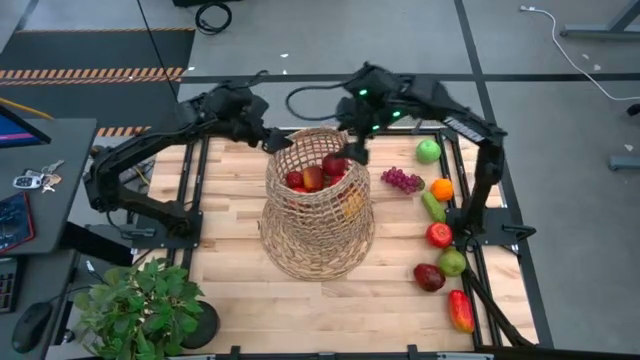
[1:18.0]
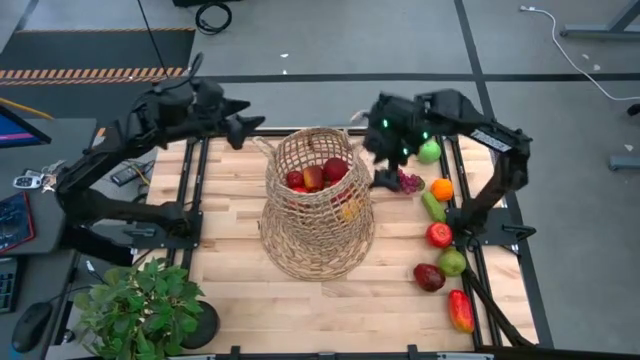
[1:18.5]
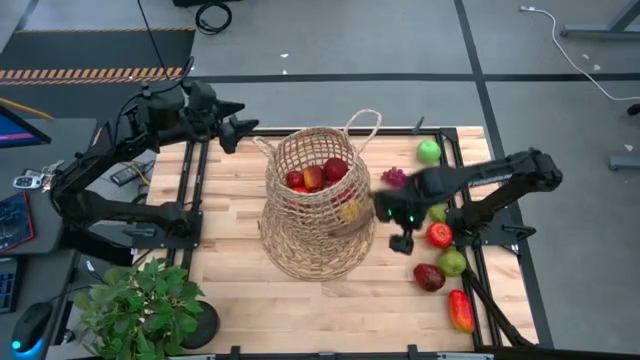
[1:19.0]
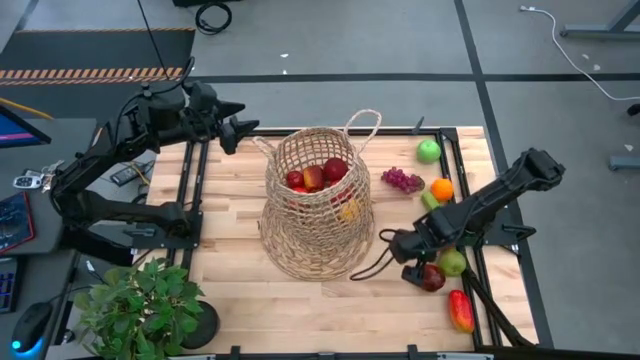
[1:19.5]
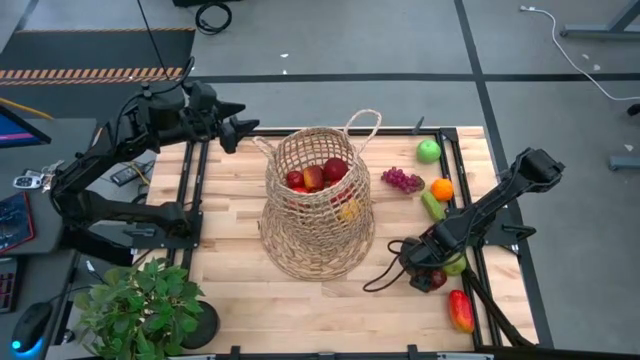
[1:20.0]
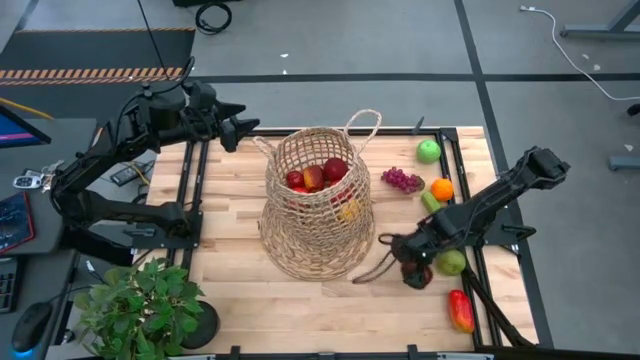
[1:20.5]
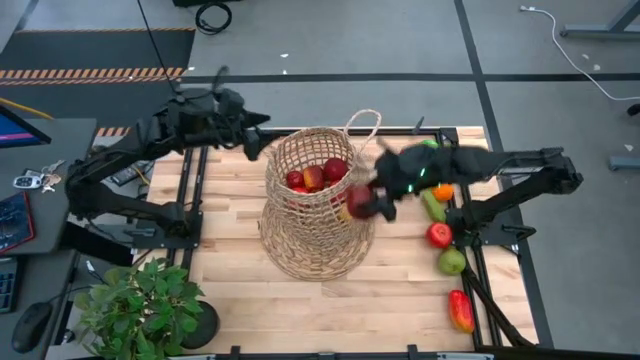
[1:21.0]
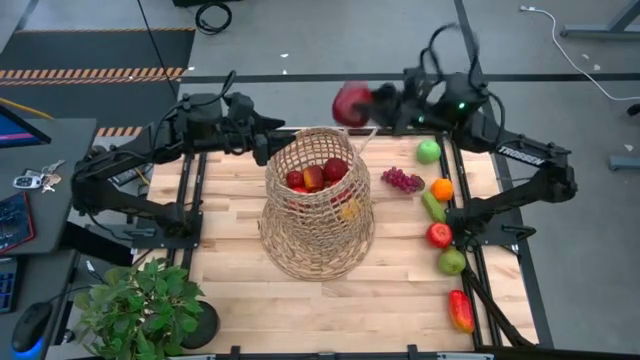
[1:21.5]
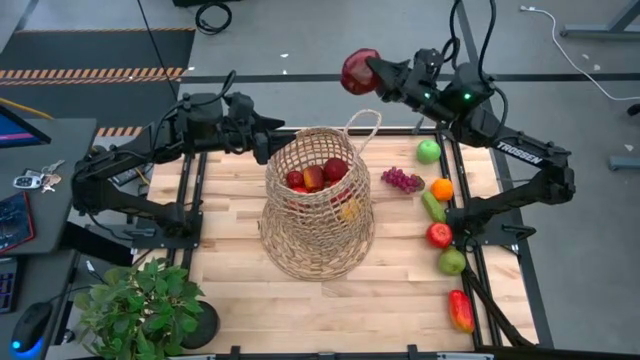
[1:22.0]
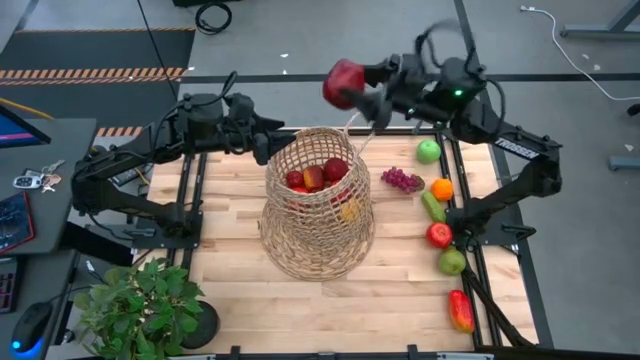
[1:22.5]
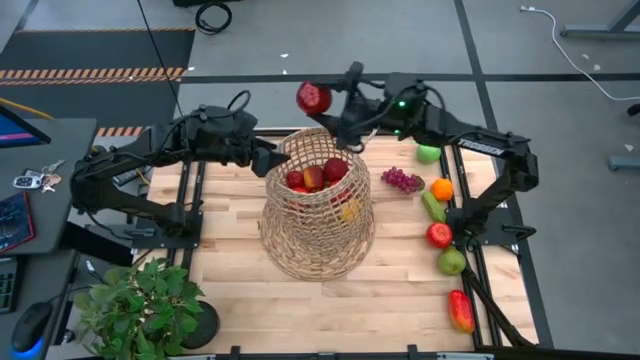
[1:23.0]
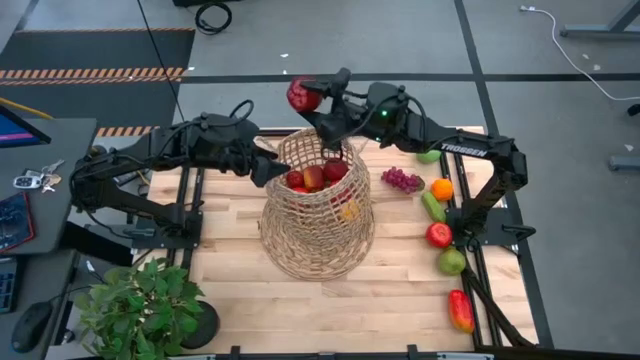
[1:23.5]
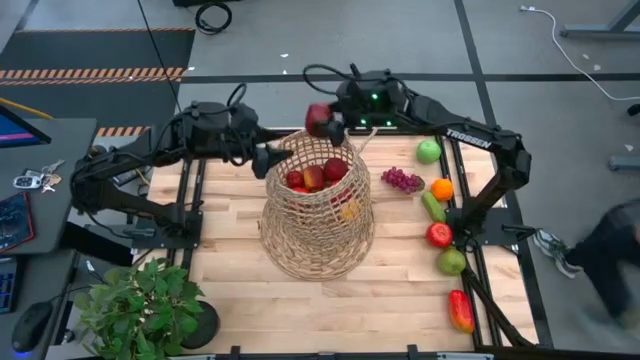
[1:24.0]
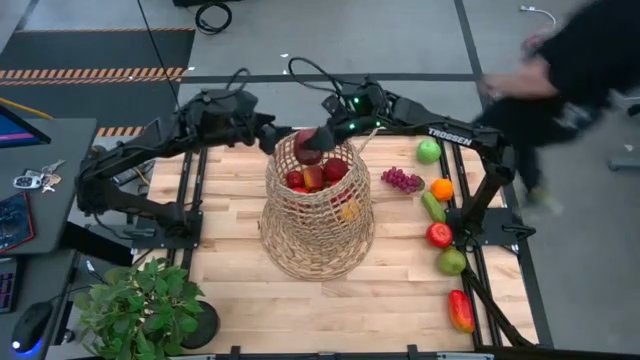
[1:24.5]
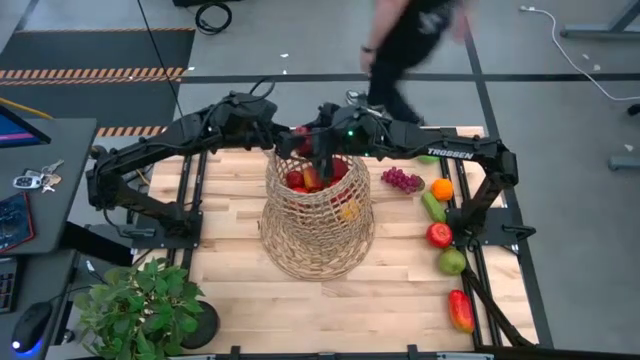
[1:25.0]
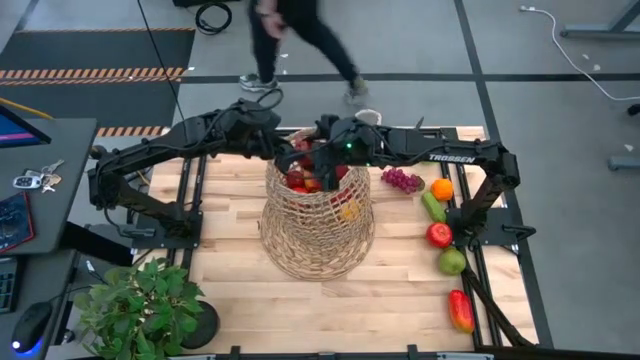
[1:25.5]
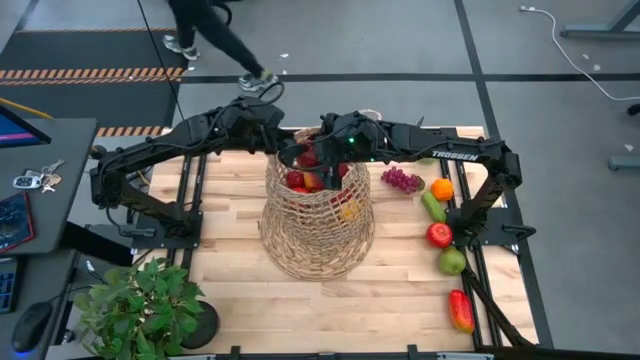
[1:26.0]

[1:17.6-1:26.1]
Task: Build produce basket
Put the red apple into the brown basket

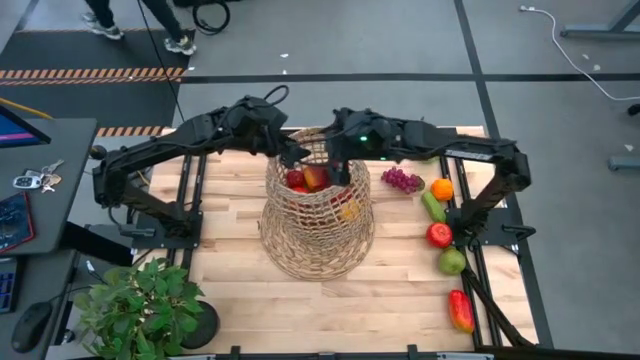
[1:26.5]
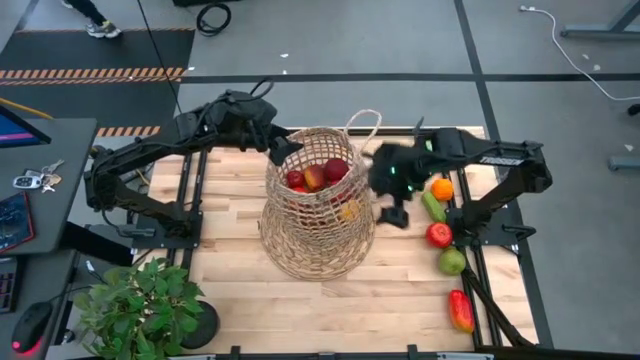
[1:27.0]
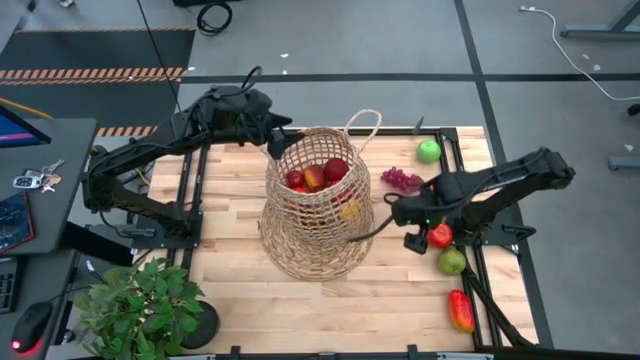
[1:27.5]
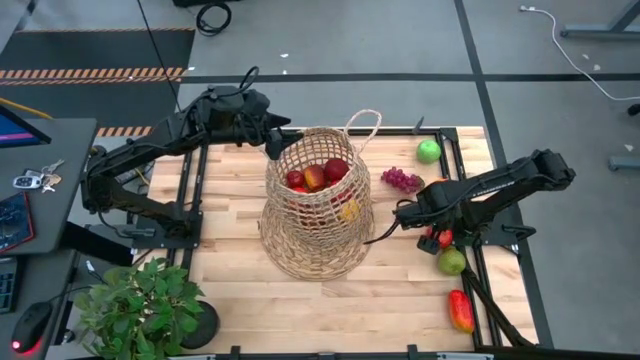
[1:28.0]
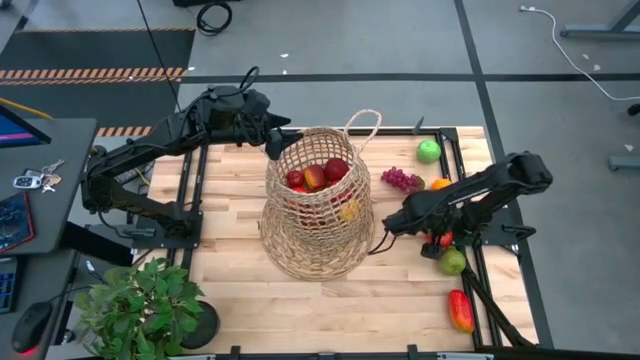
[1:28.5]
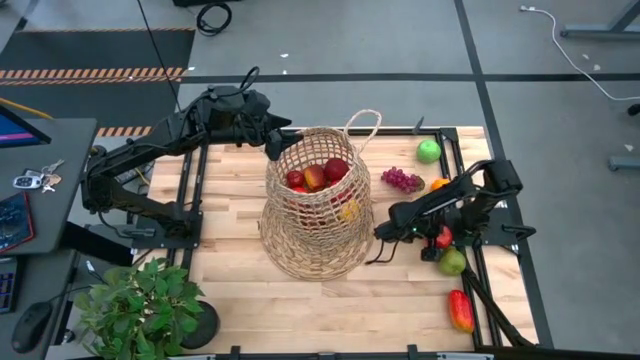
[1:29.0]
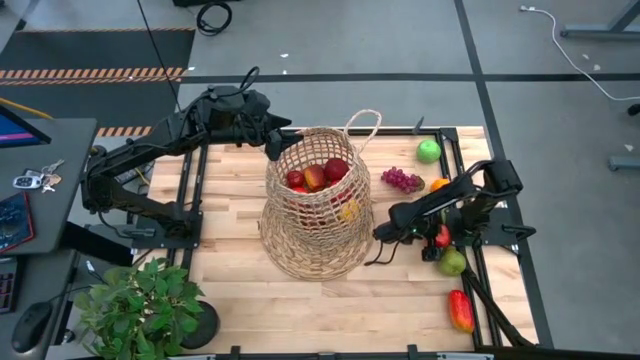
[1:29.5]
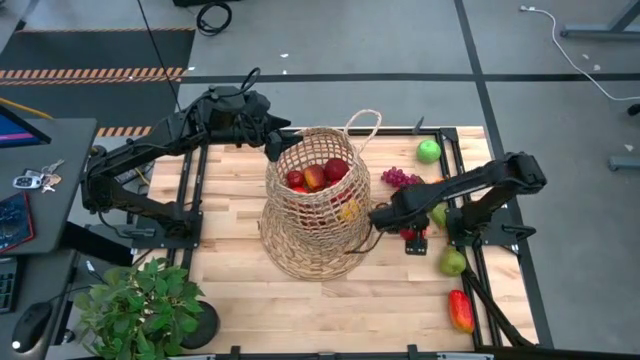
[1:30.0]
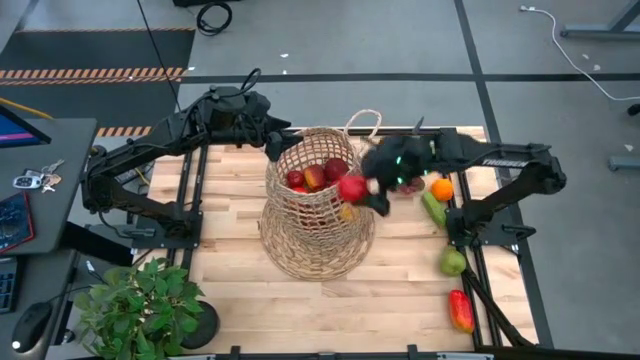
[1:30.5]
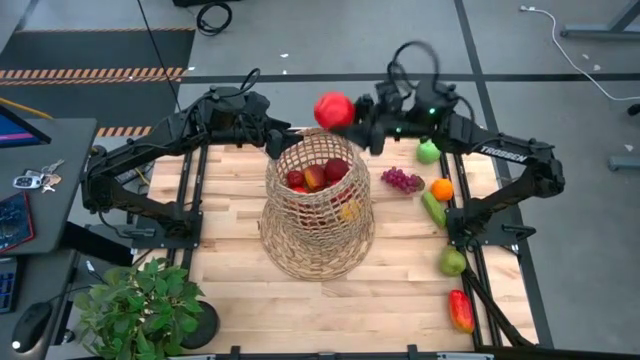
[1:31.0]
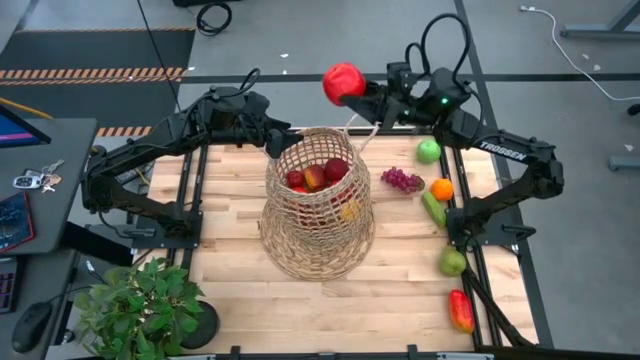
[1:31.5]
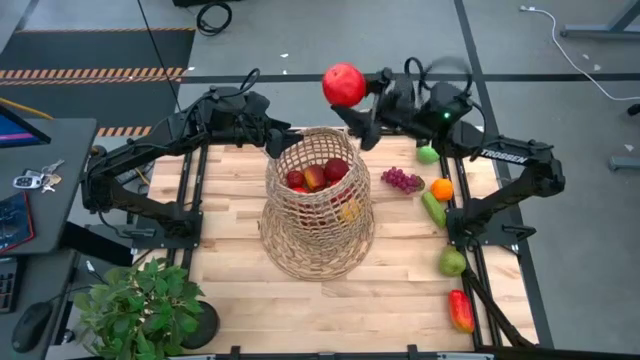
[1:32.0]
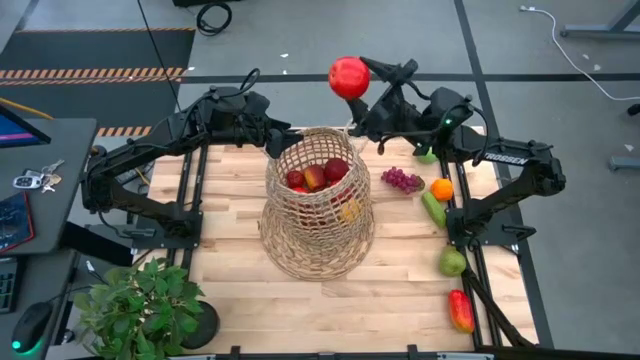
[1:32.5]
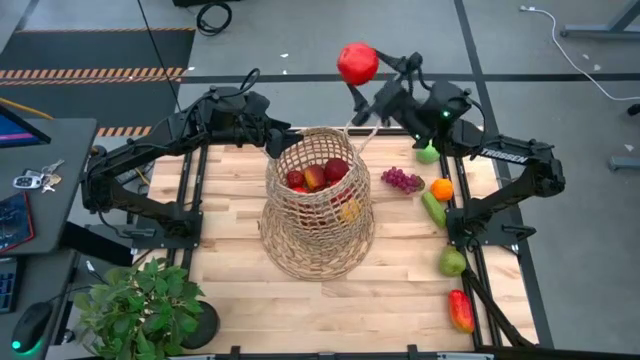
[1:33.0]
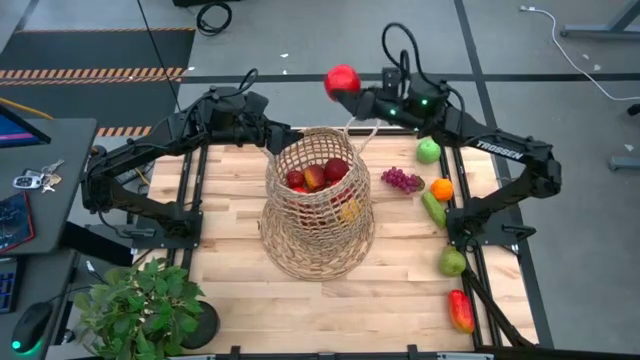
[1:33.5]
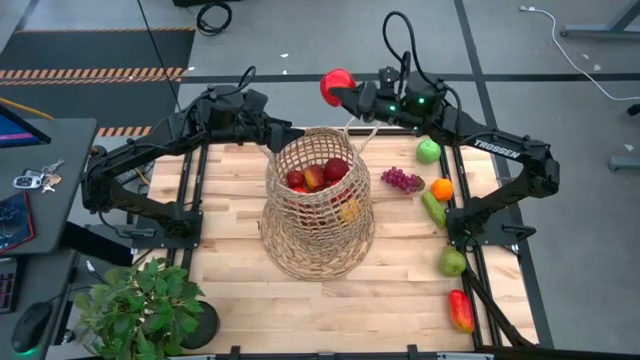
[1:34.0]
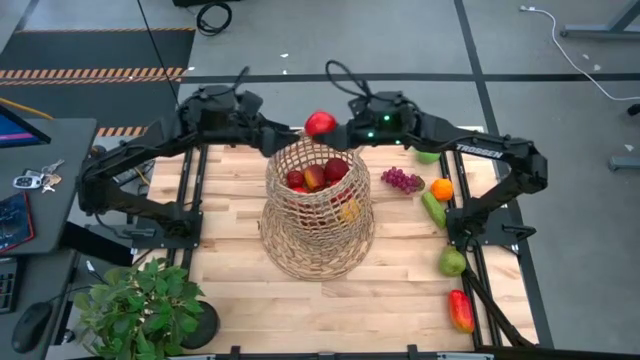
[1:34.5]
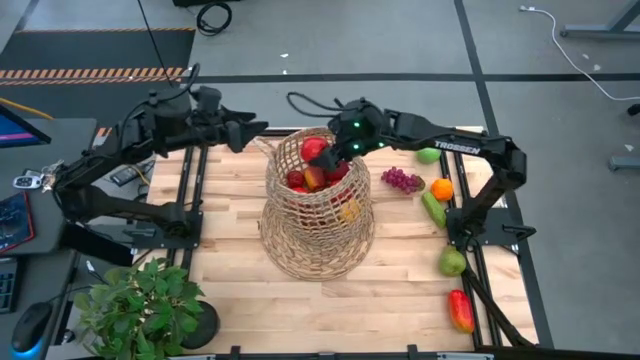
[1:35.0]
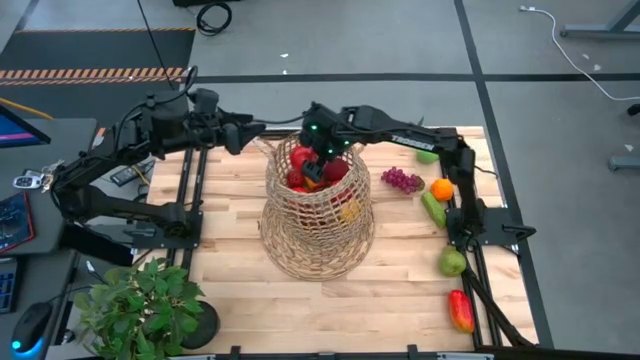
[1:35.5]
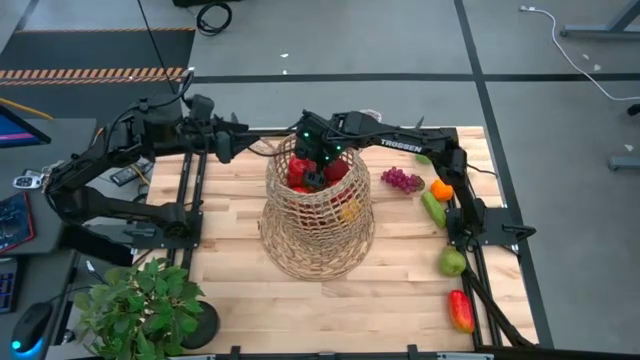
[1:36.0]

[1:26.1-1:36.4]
Put the red apple into the brown basket

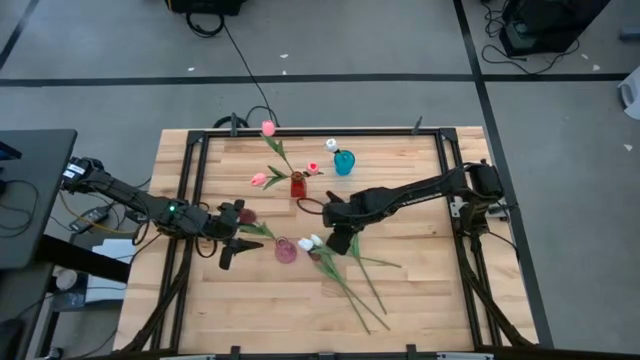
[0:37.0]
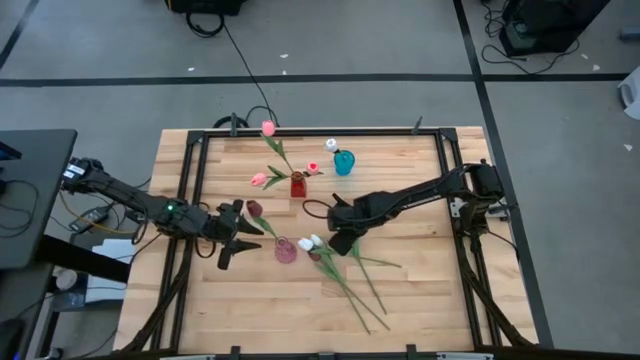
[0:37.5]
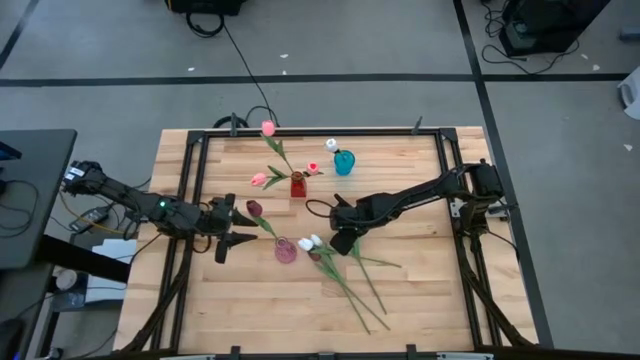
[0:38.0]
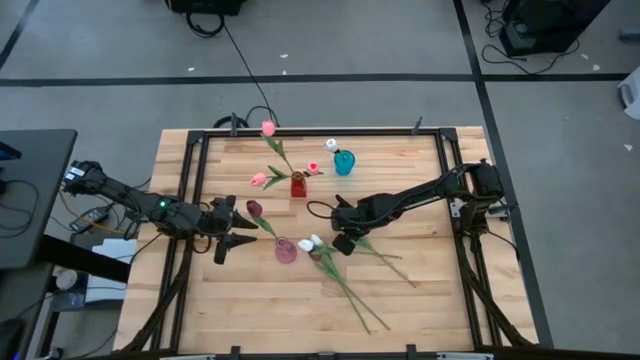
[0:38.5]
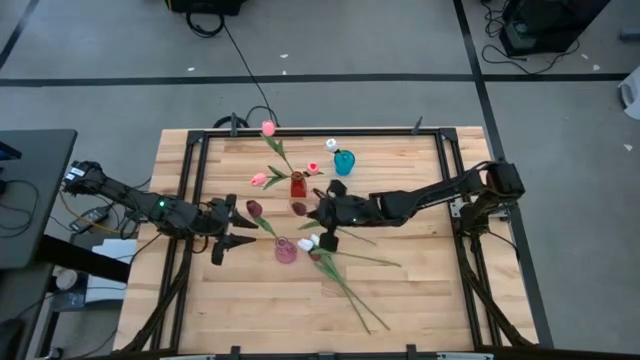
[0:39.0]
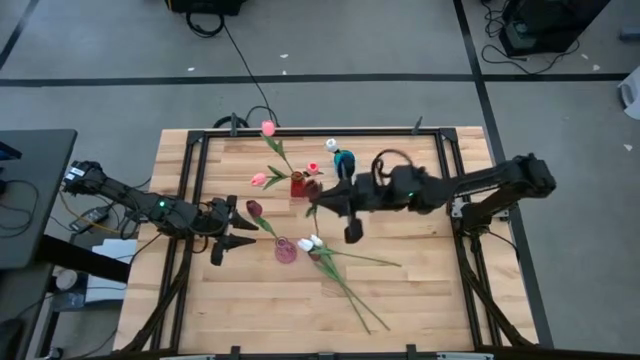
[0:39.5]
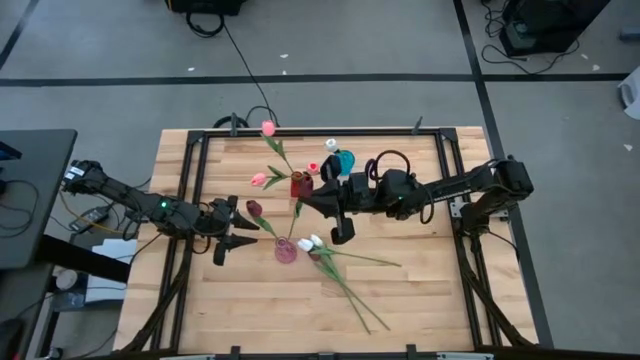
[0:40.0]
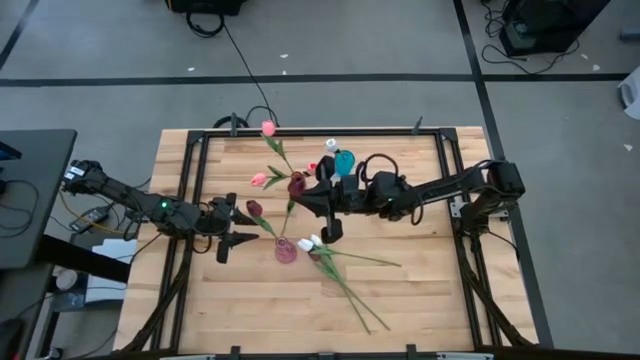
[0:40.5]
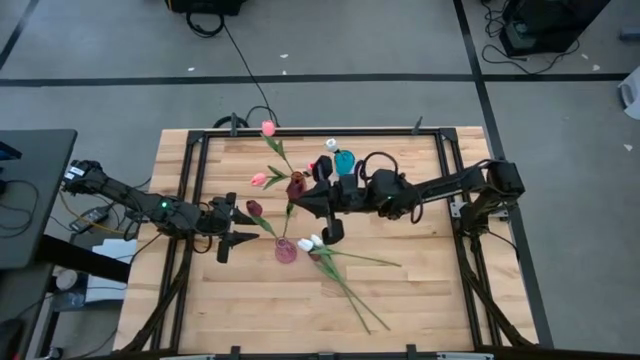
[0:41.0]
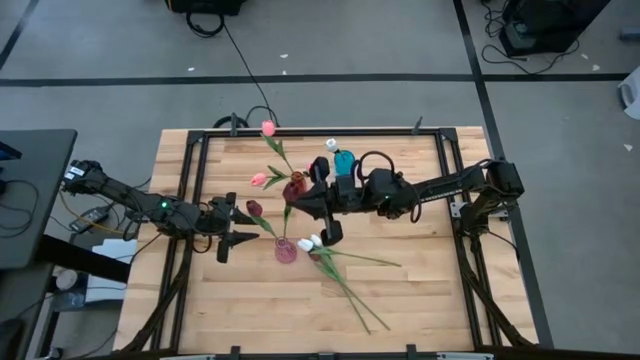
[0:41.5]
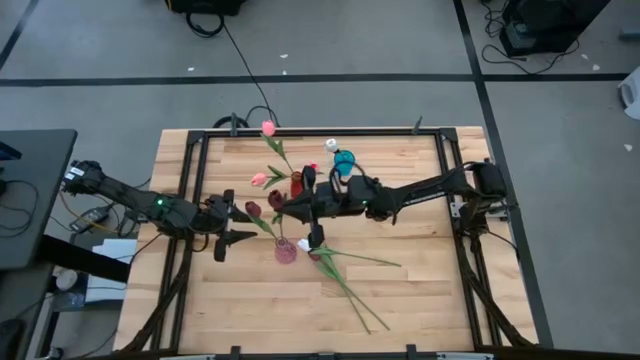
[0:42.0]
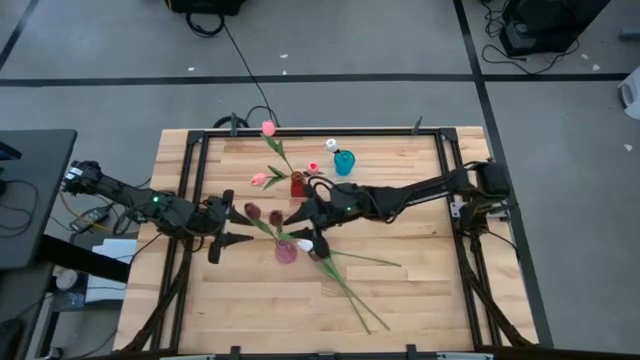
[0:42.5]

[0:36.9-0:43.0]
Task: Sort flowers into vase by color
Put the red flower into the purple vase
